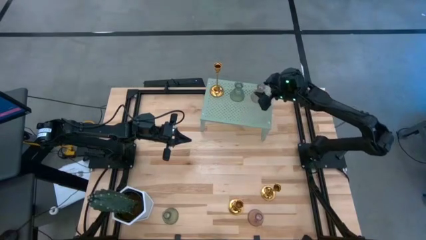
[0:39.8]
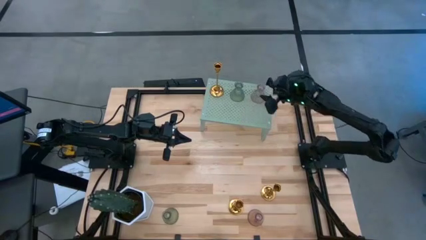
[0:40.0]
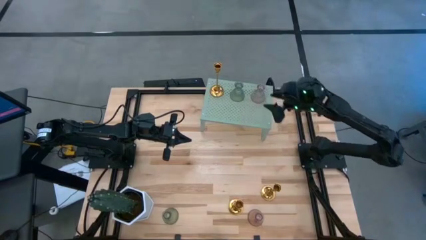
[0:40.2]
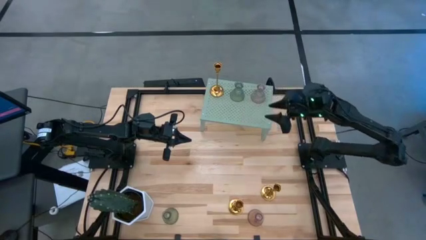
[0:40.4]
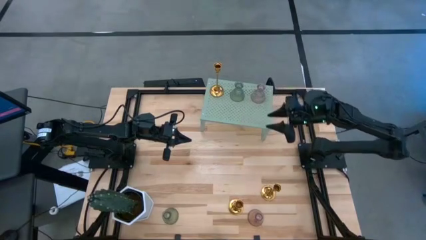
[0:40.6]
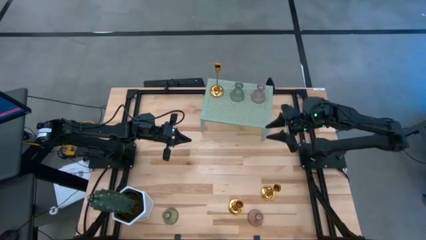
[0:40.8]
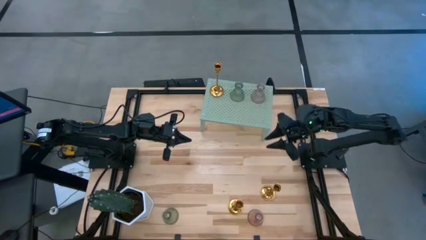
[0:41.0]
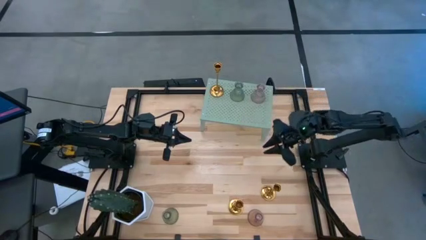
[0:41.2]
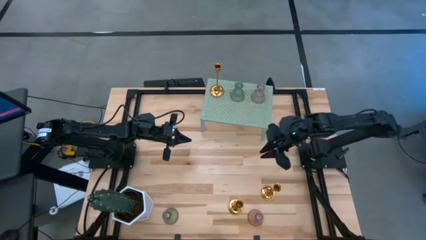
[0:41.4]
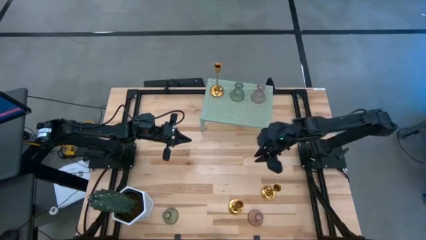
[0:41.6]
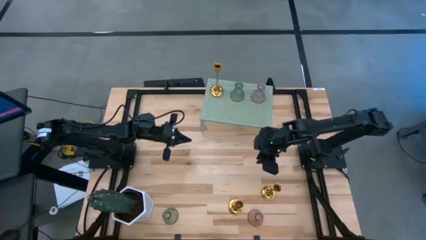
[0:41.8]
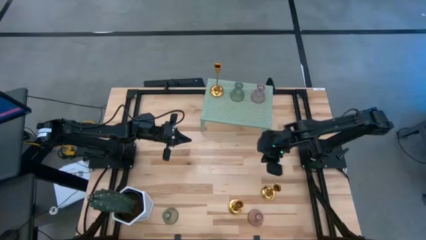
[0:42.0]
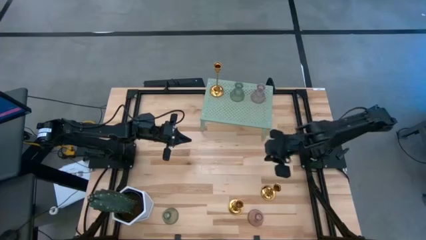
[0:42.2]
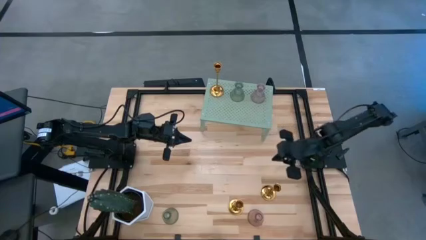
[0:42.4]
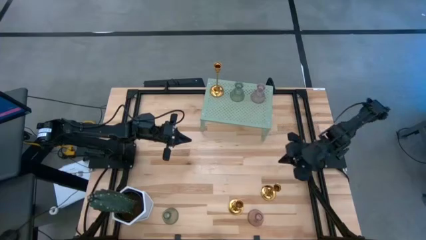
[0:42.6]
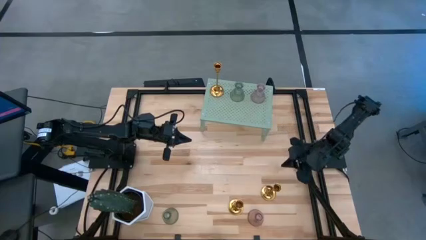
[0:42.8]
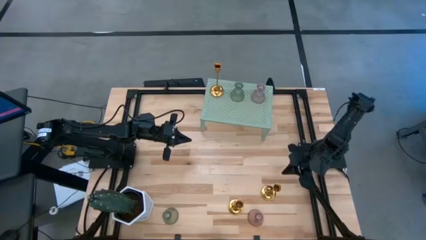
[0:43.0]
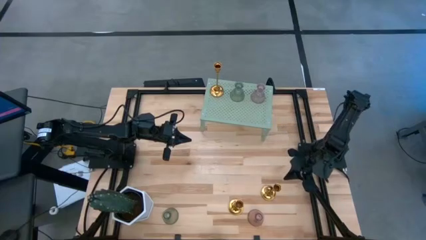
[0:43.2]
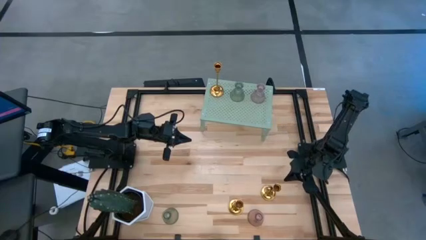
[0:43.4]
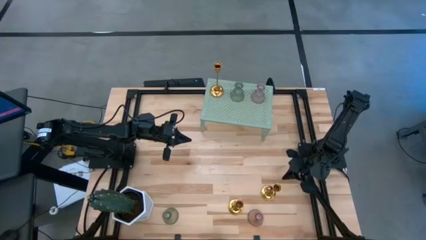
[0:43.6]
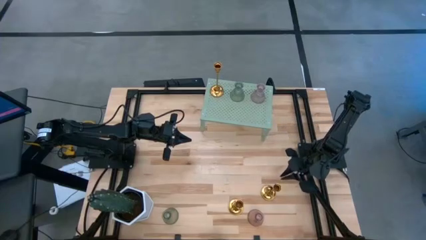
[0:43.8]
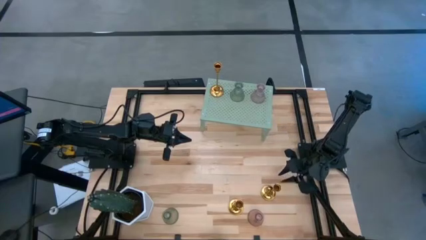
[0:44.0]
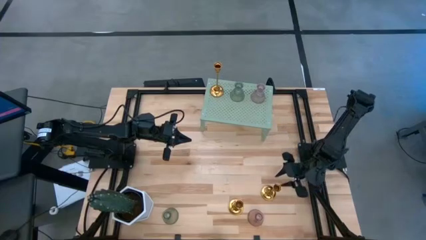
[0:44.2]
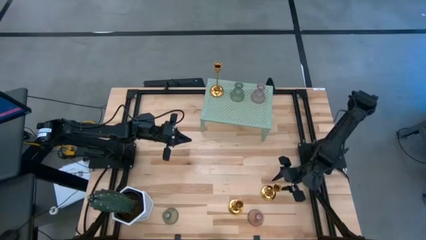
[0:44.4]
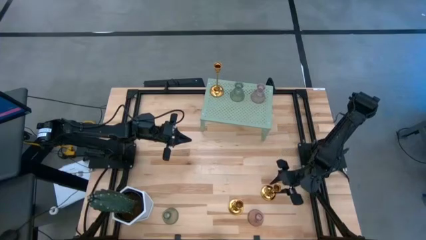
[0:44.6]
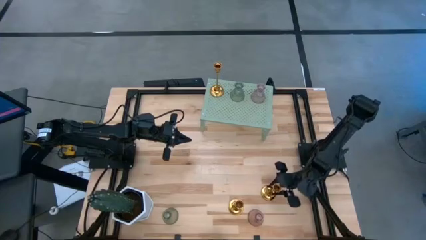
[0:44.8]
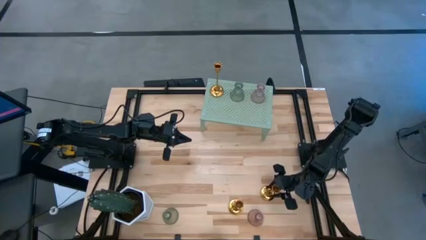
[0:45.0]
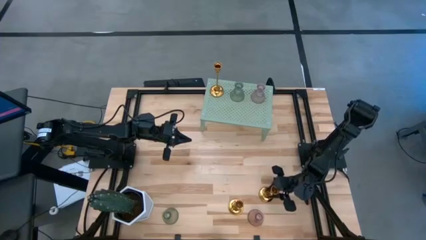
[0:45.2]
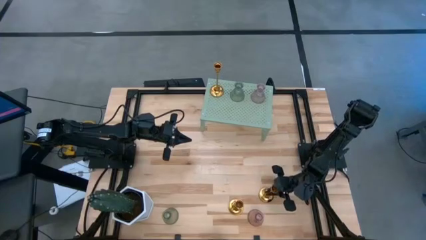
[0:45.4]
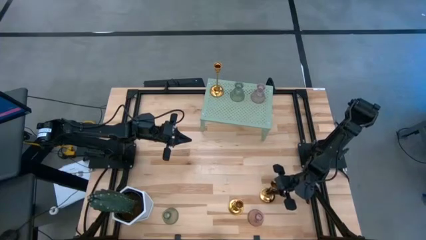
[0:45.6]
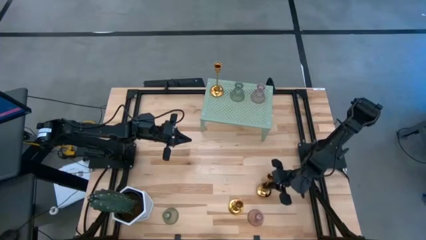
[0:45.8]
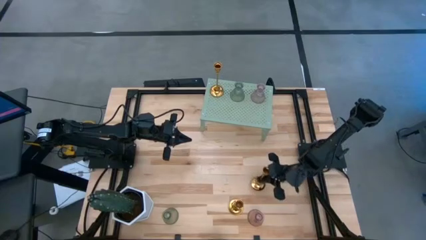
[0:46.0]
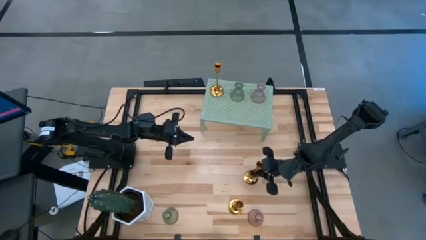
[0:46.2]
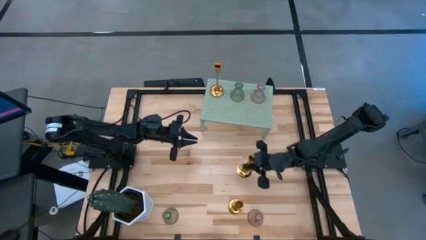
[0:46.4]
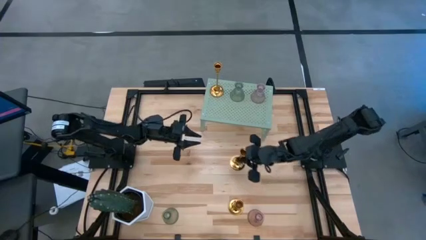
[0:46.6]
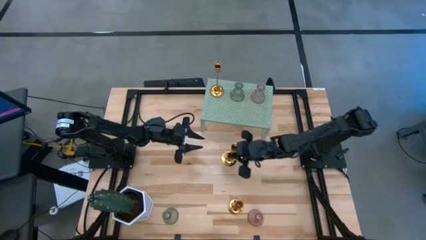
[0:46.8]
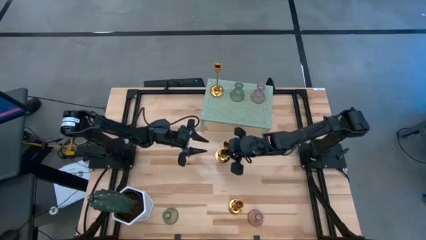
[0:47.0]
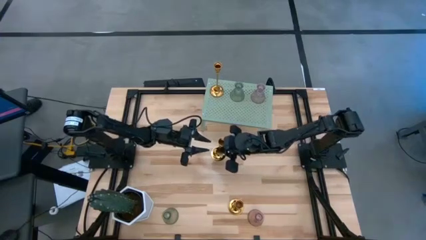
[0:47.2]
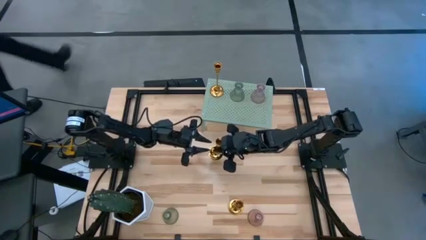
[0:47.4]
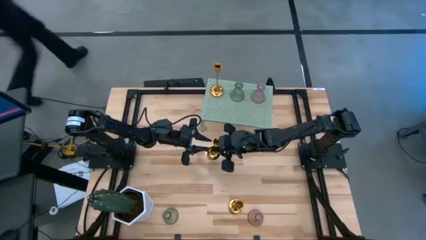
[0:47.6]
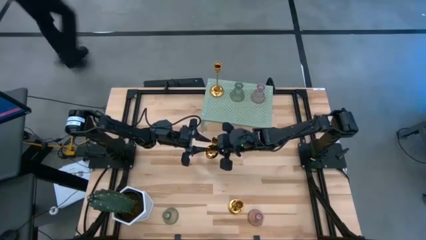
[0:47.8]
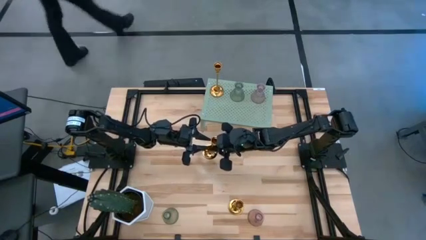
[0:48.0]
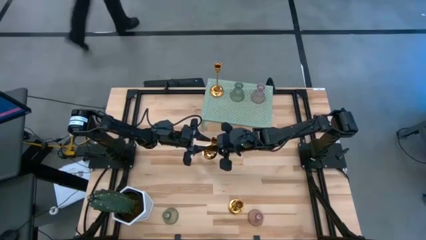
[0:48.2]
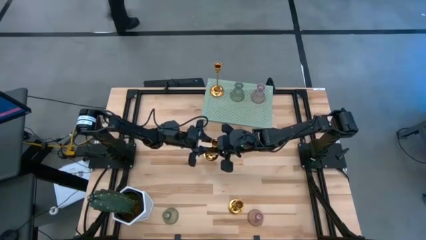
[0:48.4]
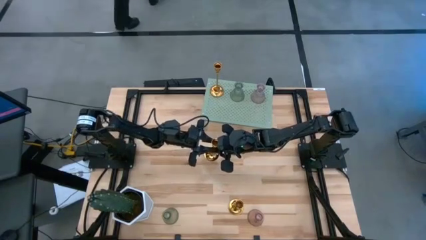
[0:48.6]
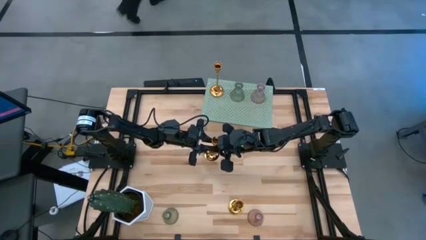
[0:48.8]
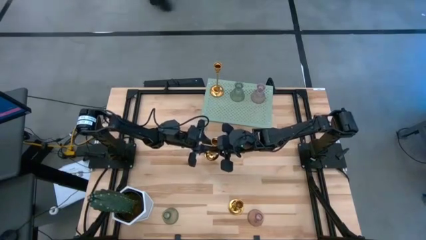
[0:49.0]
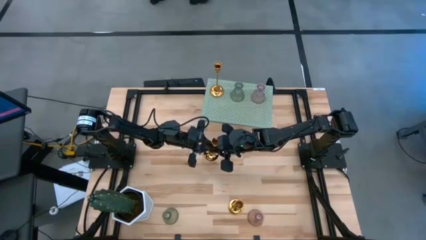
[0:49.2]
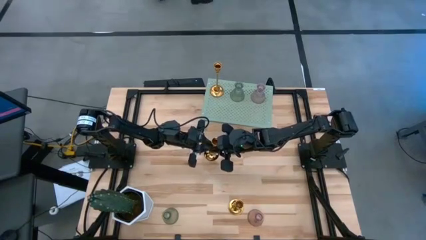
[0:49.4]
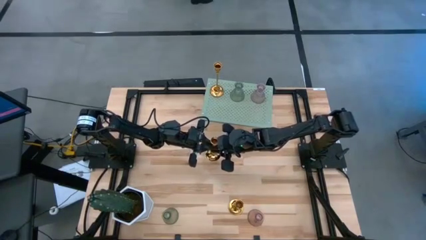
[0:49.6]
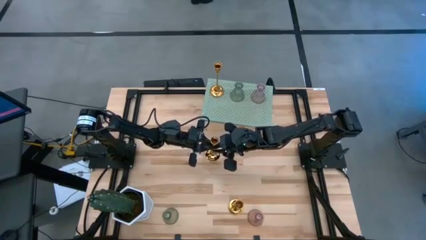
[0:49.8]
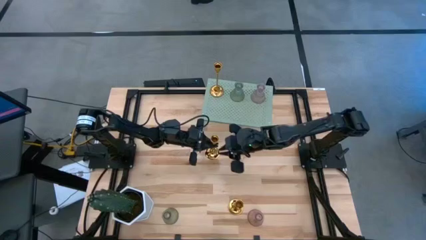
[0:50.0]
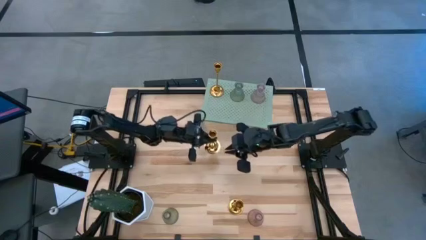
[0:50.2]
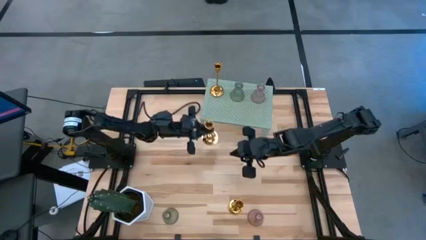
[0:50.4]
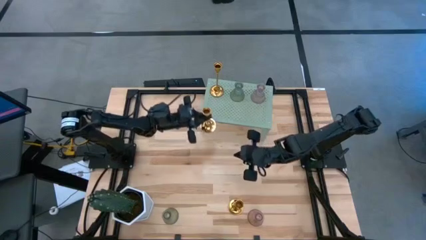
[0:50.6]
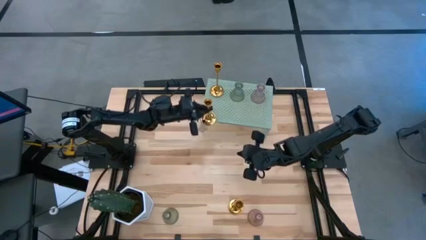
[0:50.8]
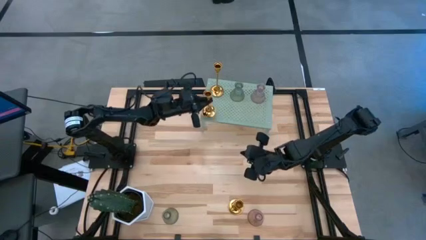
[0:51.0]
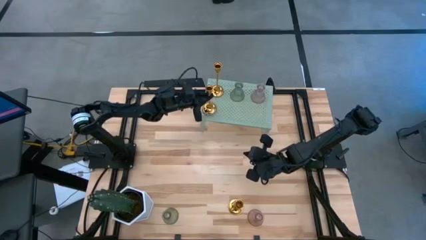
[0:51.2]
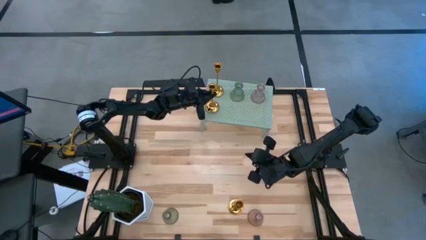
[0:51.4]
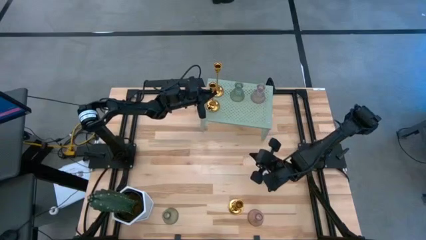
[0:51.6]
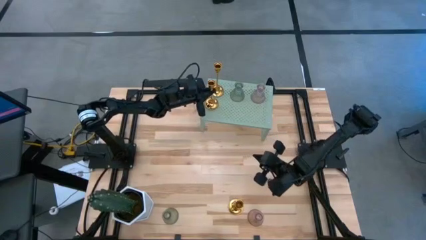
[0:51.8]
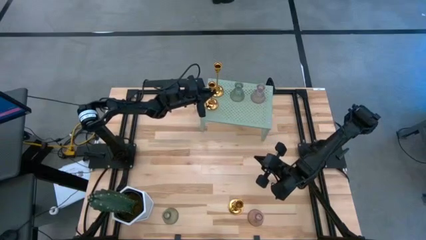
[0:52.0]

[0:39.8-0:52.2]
Task: Pick & Place candle stick holders
Put the right golden candle holder on the shelf aligned with the other golden candle holder
